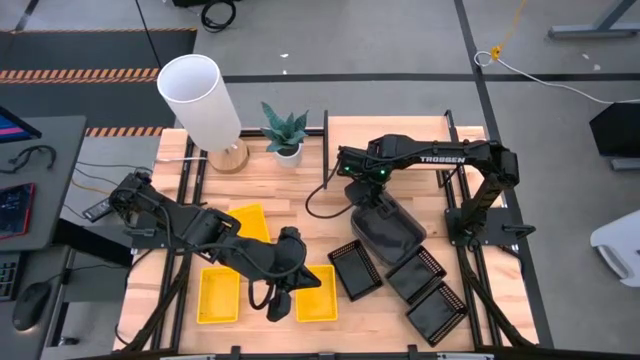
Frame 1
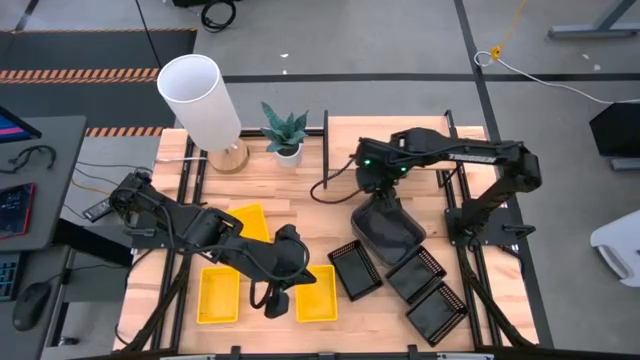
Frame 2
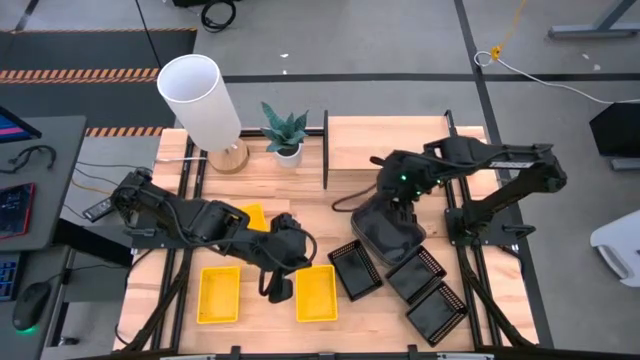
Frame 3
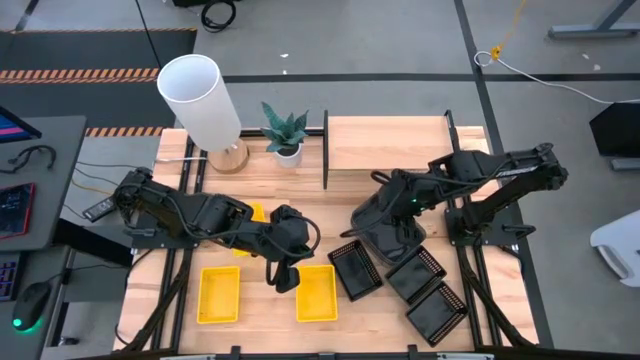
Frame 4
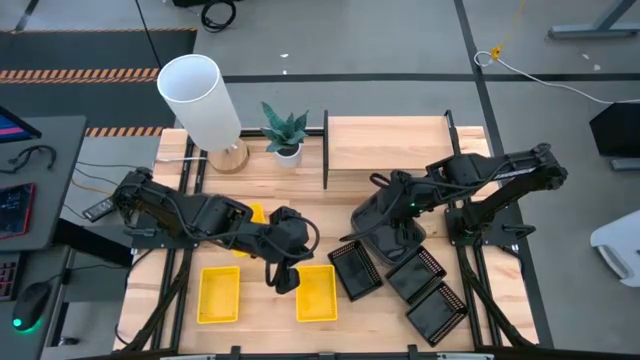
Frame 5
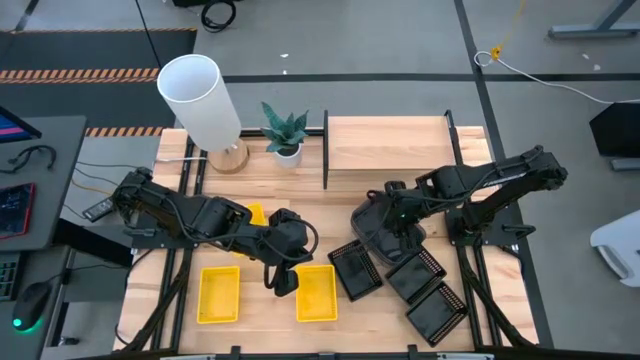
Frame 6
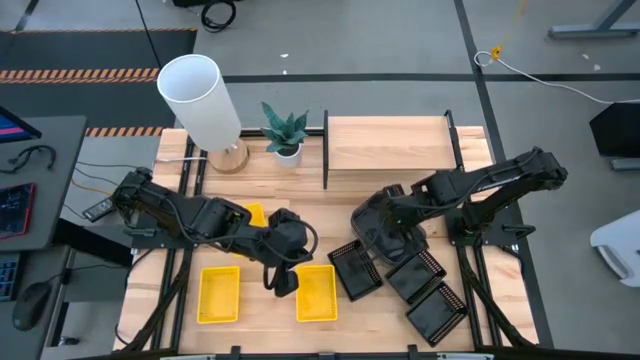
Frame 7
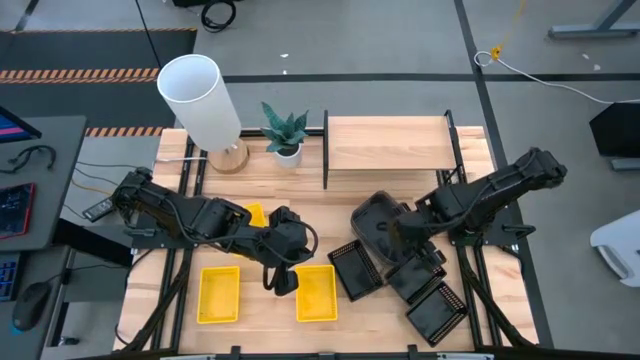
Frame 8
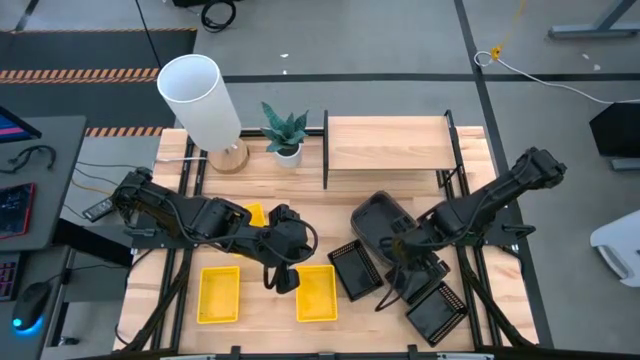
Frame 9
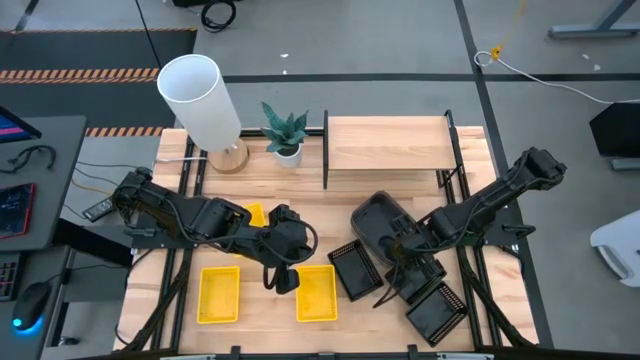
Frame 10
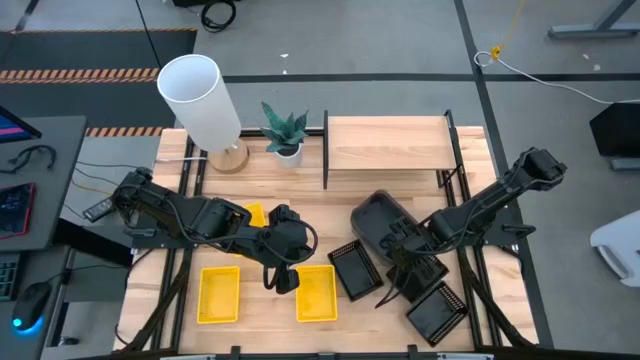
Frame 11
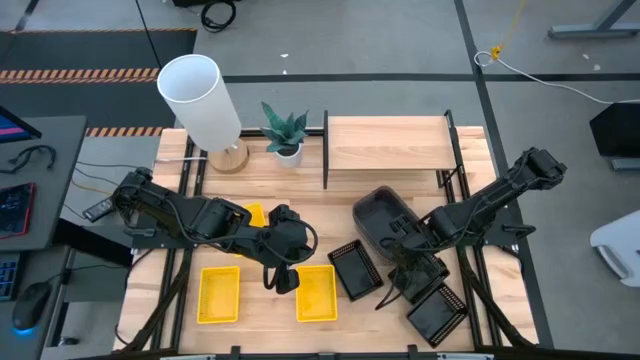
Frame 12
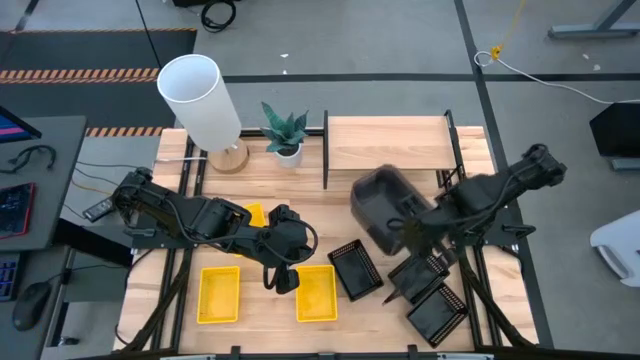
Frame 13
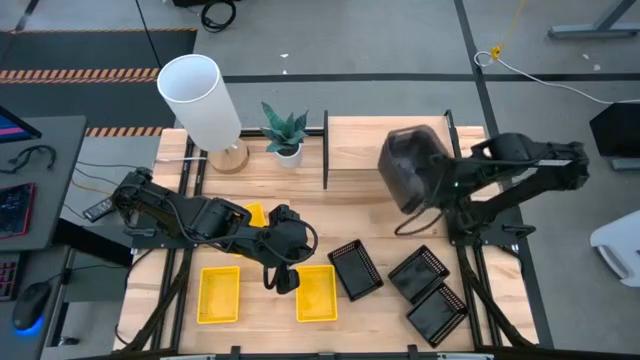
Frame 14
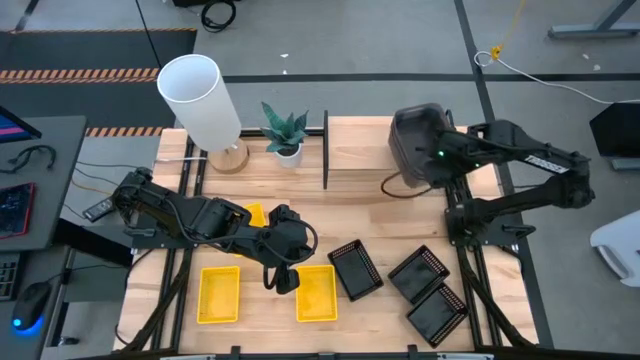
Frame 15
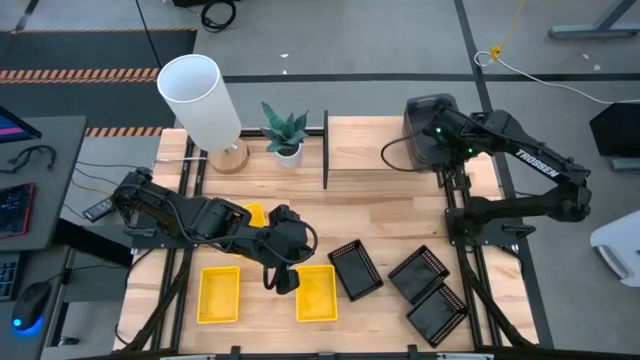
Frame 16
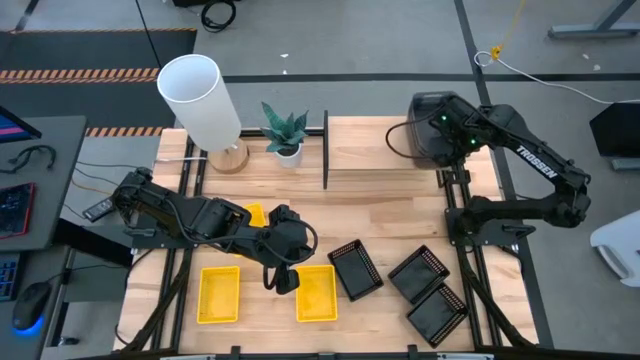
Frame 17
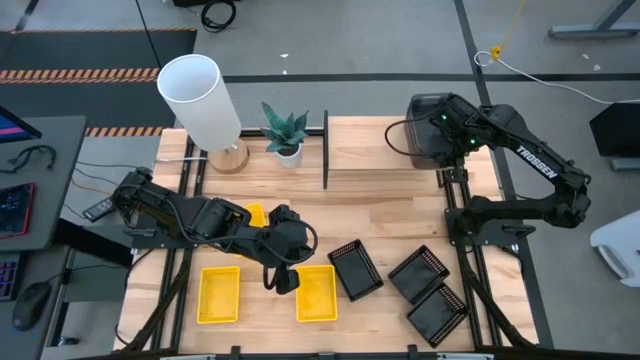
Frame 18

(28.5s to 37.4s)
Task: Stack baskets on shelf by color
Put the stacked gray bins on the shelf

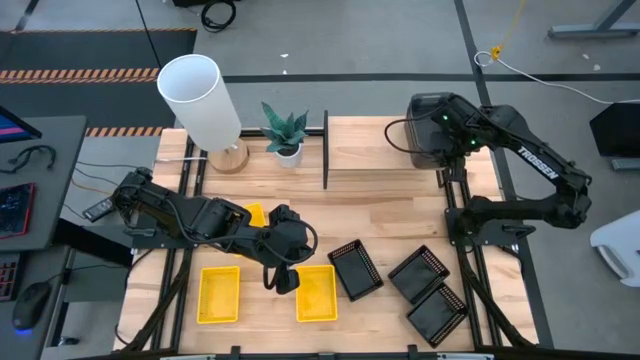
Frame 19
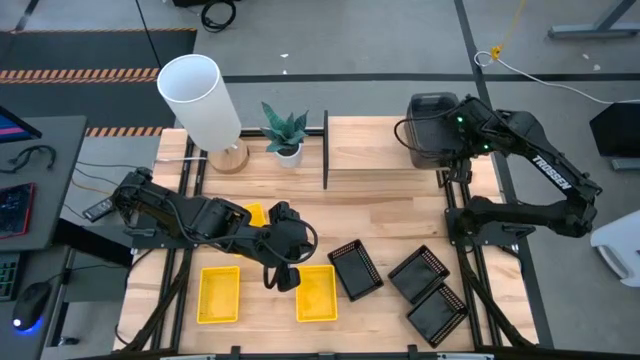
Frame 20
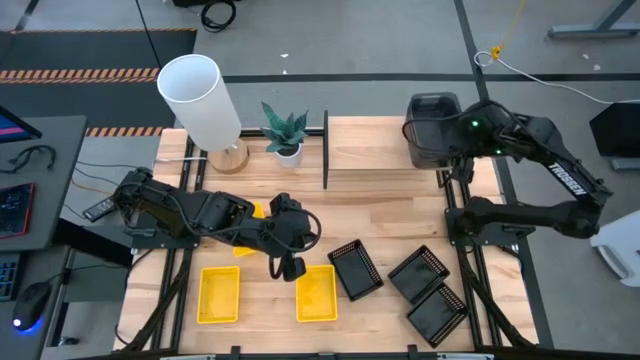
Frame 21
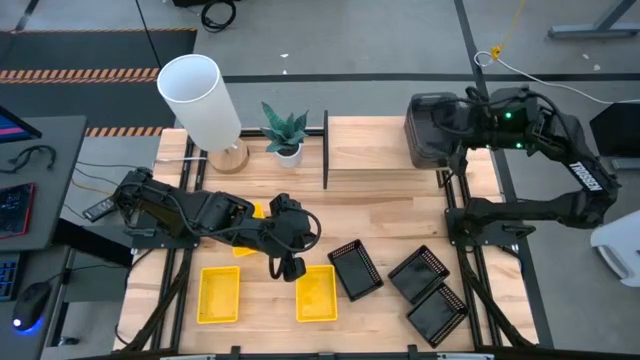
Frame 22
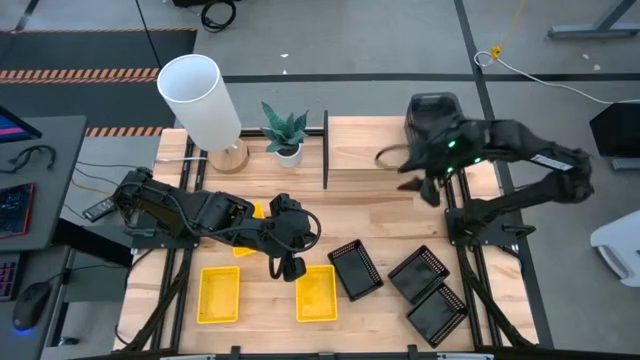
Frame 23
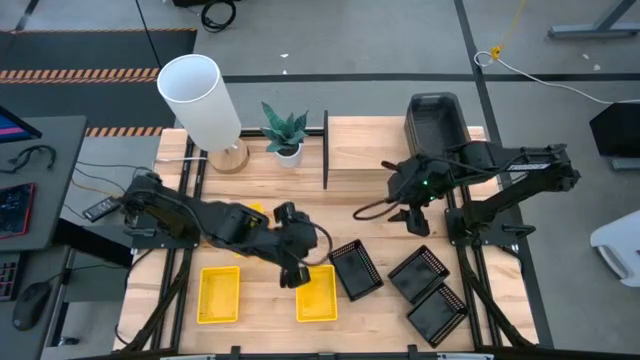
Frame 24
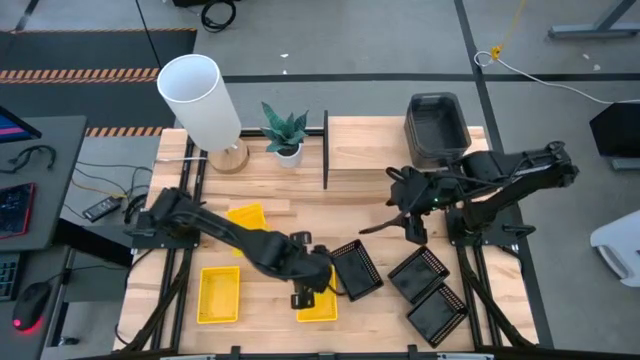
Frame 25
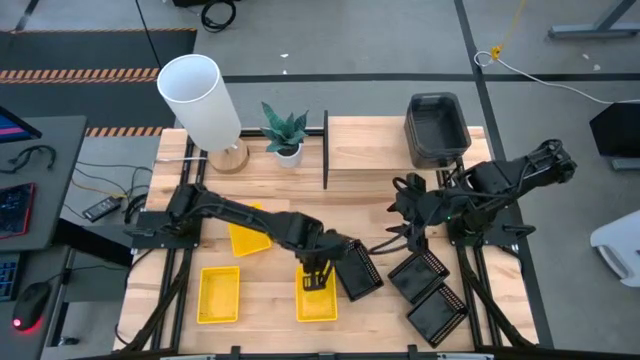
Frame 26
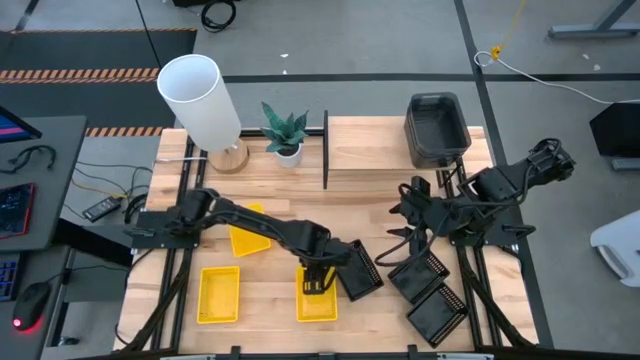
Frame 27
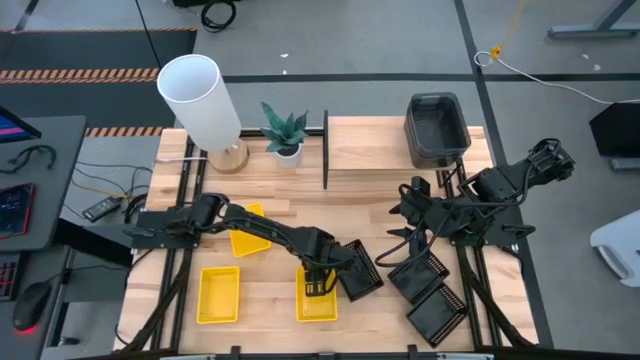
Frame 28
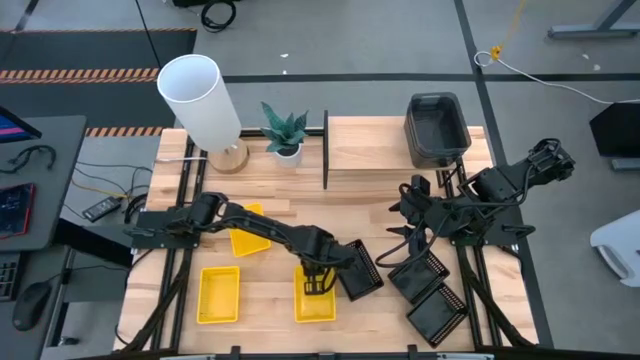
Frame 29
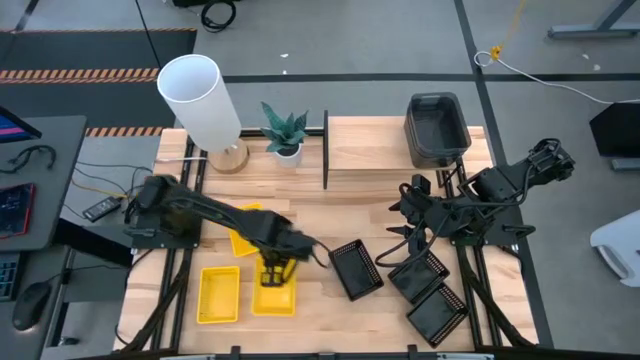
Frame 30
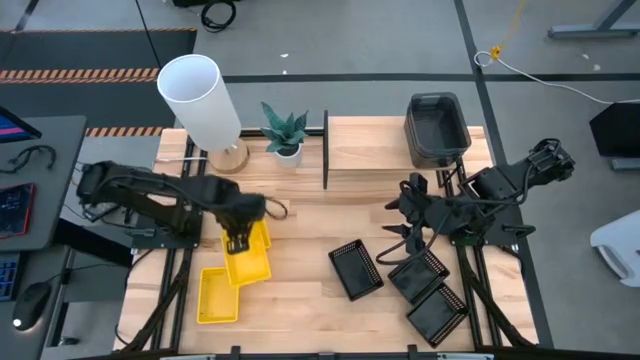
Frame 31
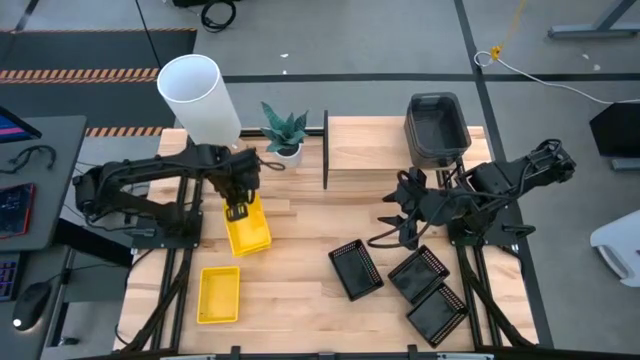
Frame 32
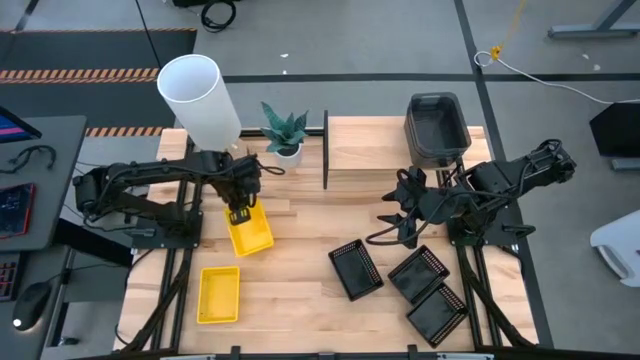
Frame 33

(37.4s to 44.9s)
Stack the bottom right yellow bin on top of the top yellow bin

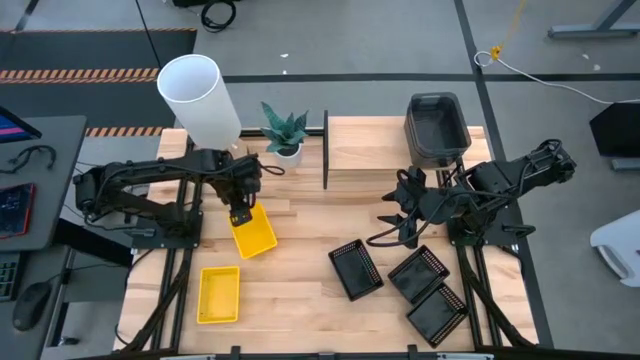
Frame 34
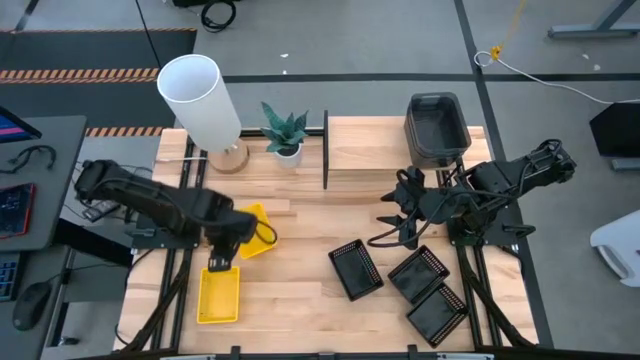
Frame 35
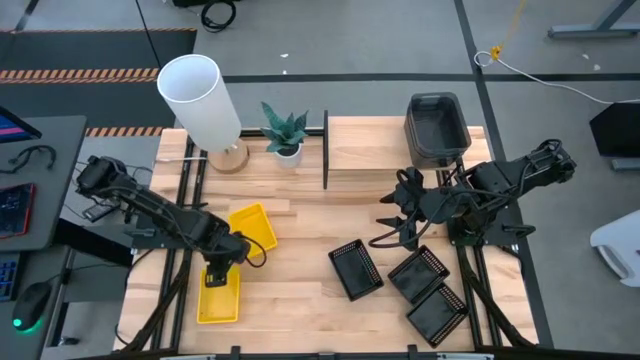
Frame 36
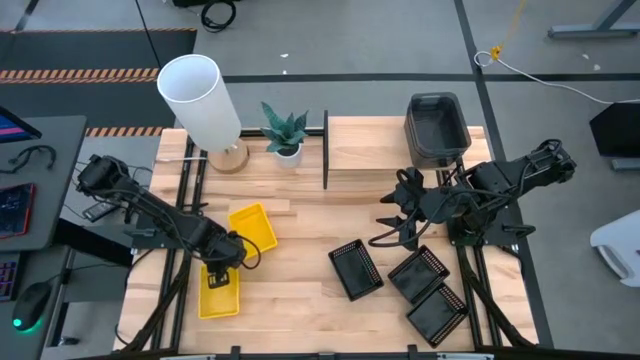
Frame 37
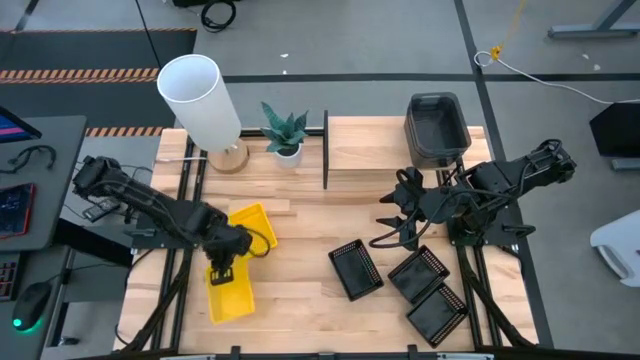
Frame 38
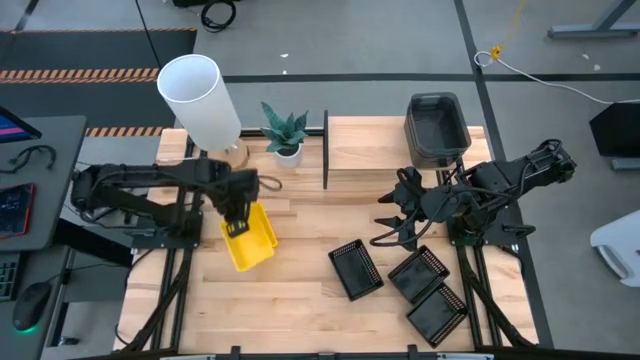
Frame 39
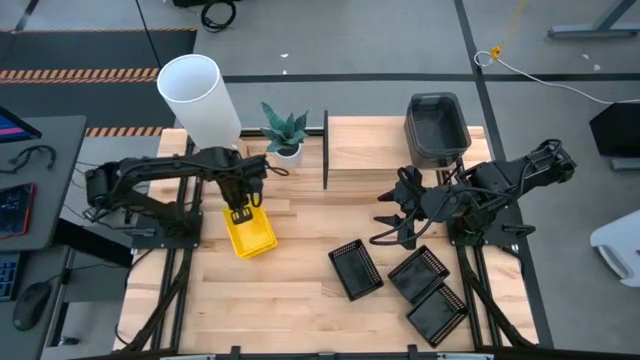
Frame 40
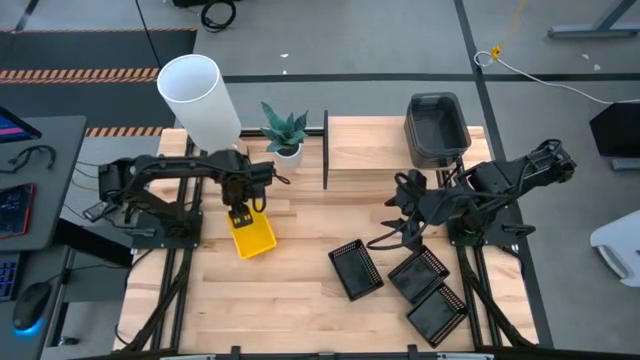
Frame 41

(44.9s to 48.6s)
Stack the bottom yellow bin on top of the yellow bin
